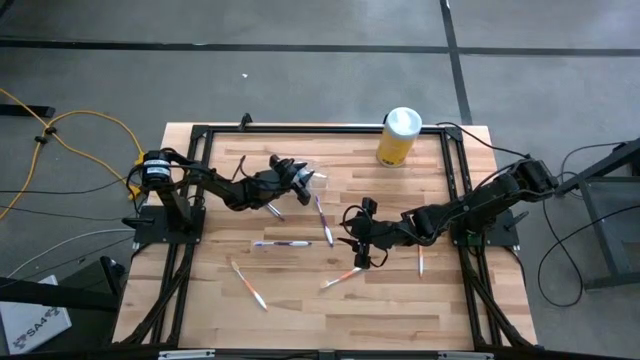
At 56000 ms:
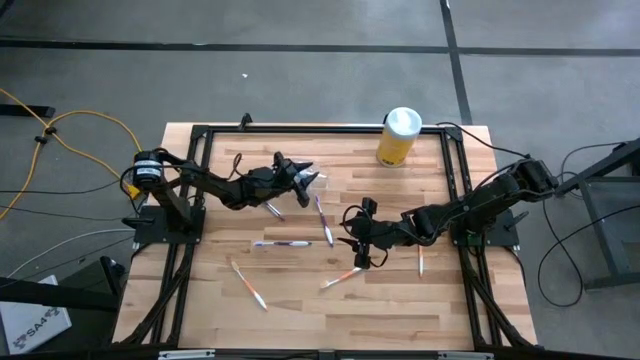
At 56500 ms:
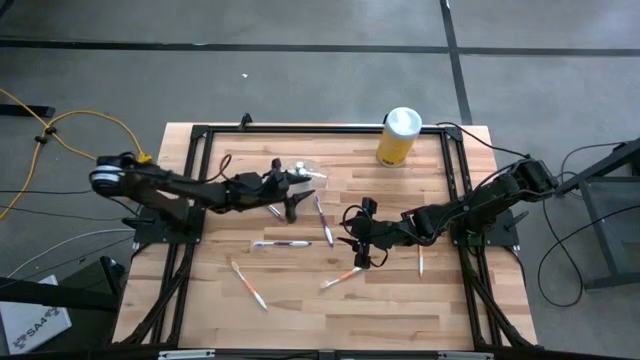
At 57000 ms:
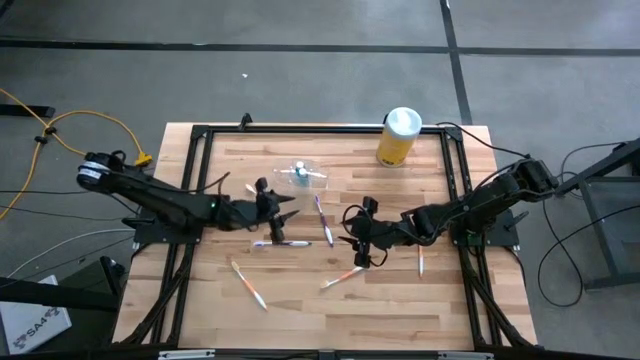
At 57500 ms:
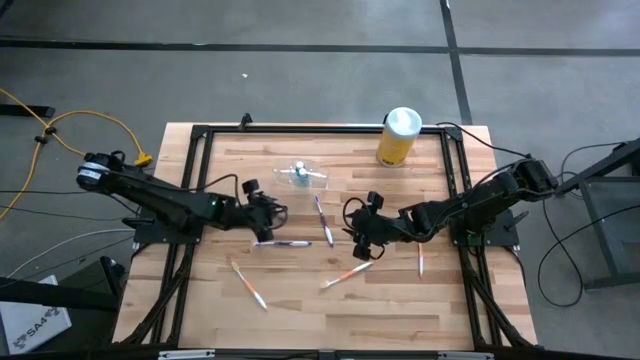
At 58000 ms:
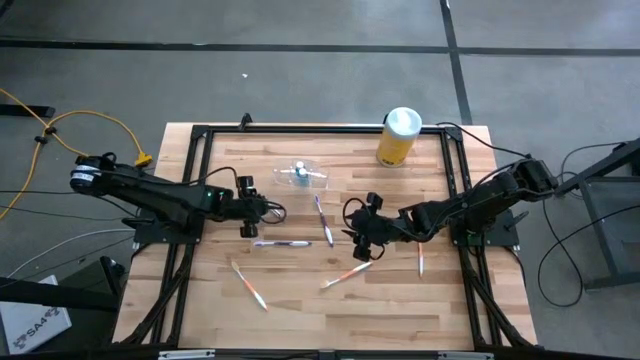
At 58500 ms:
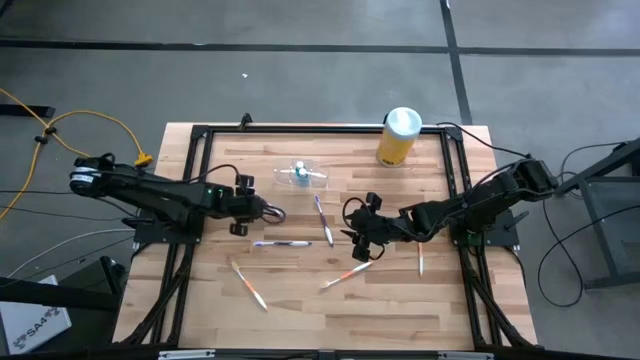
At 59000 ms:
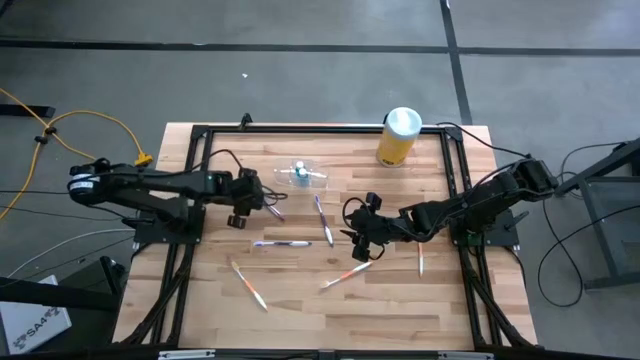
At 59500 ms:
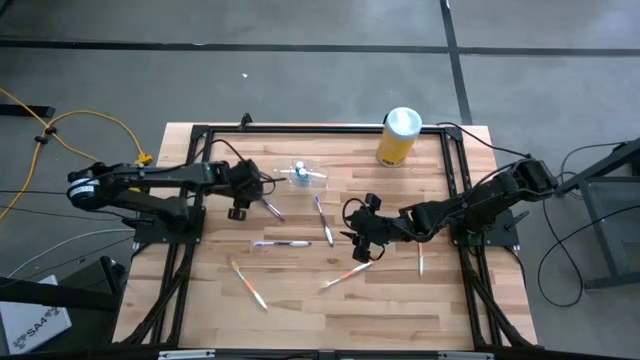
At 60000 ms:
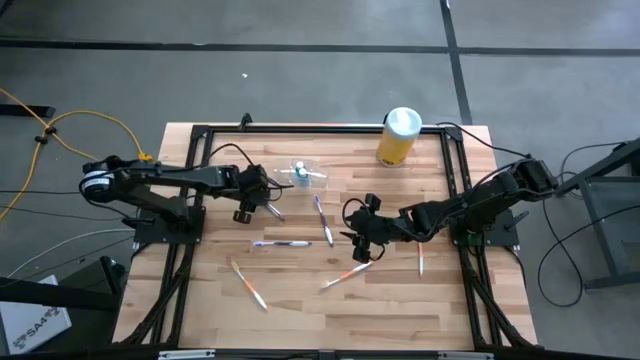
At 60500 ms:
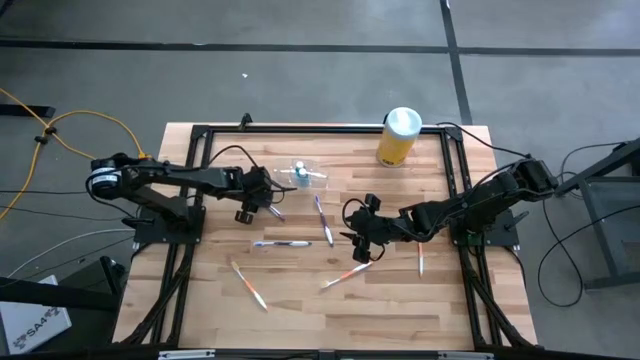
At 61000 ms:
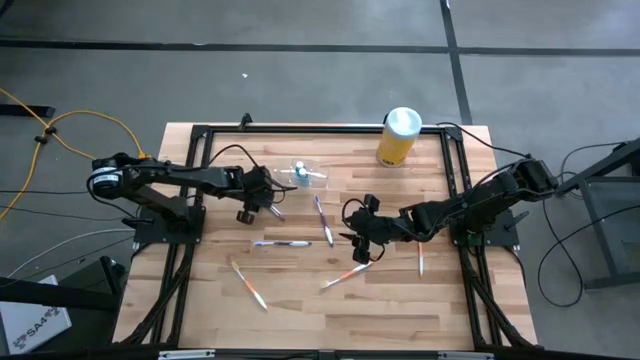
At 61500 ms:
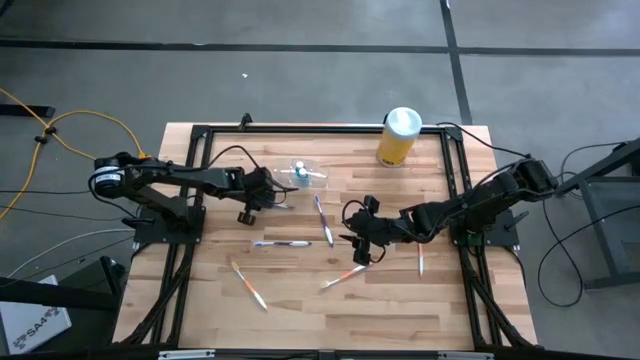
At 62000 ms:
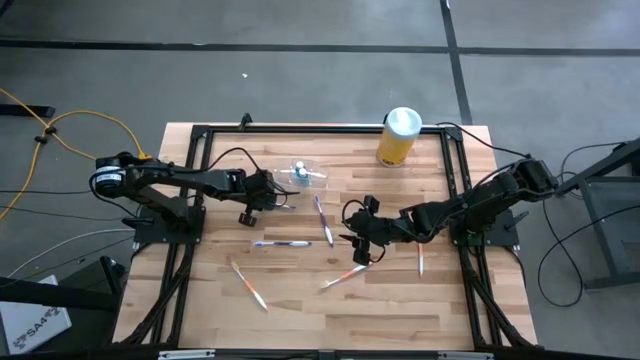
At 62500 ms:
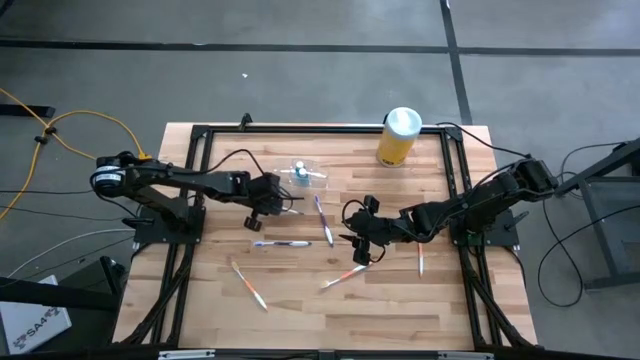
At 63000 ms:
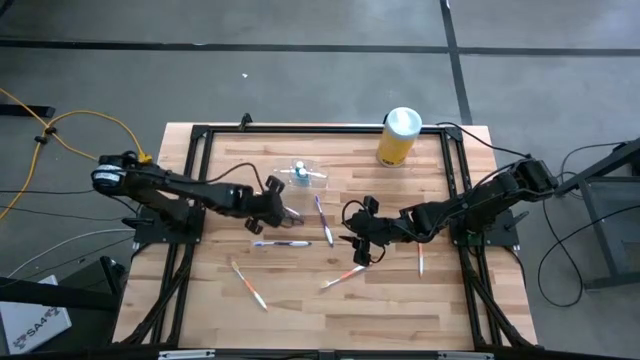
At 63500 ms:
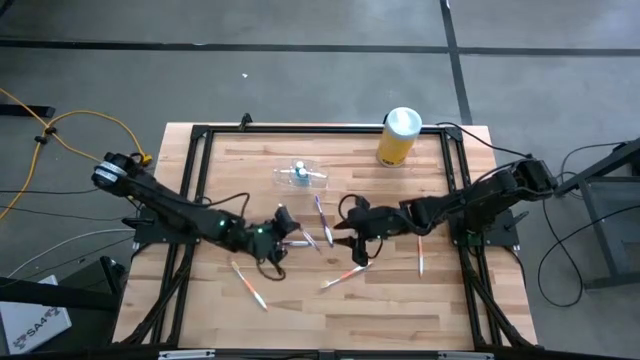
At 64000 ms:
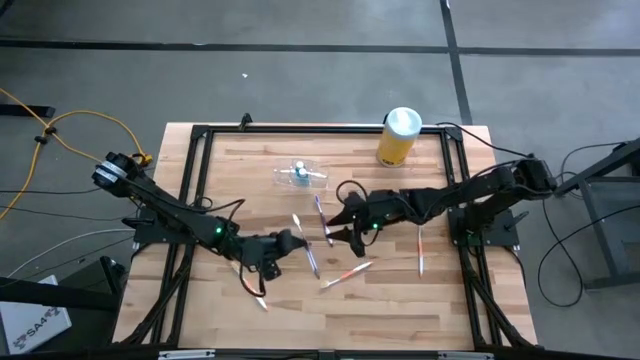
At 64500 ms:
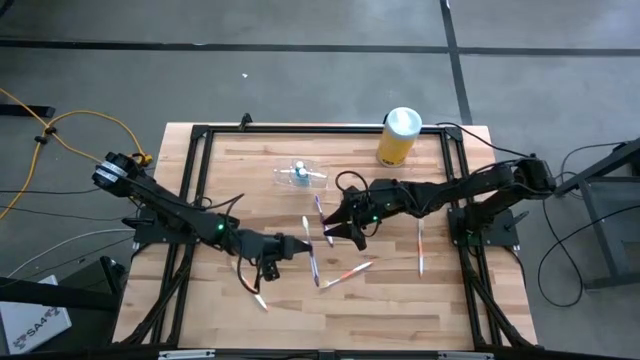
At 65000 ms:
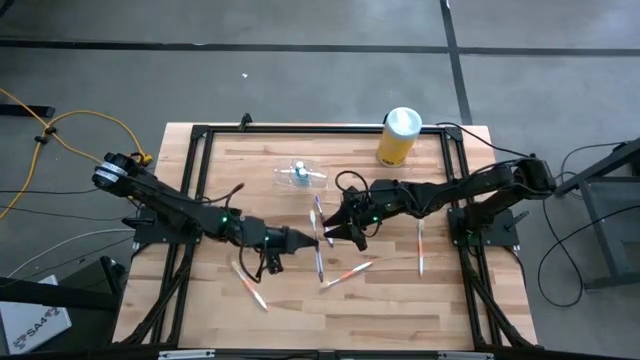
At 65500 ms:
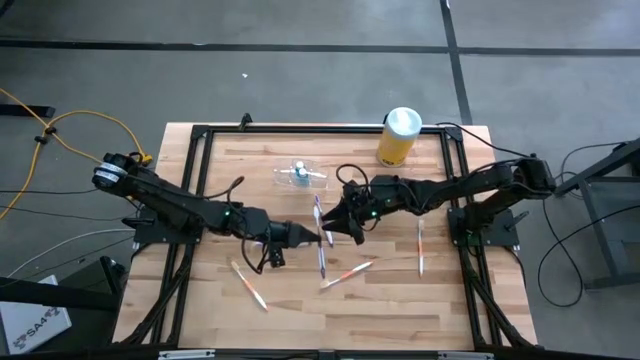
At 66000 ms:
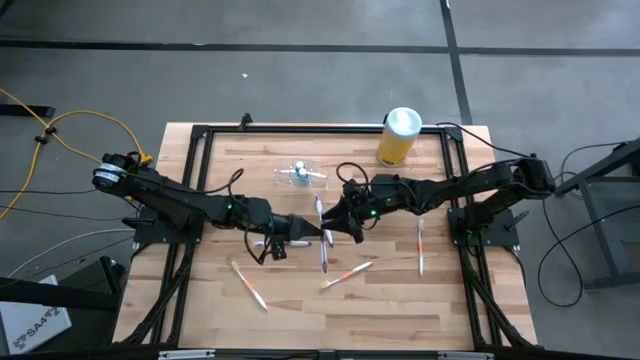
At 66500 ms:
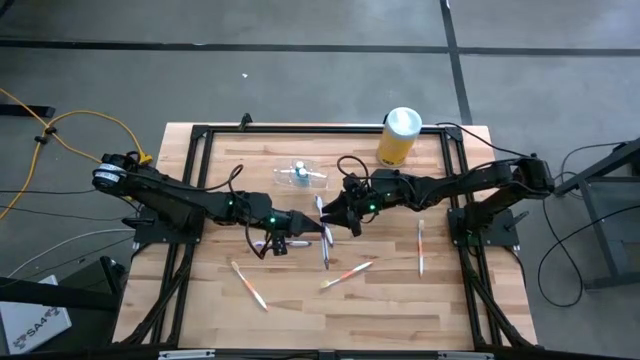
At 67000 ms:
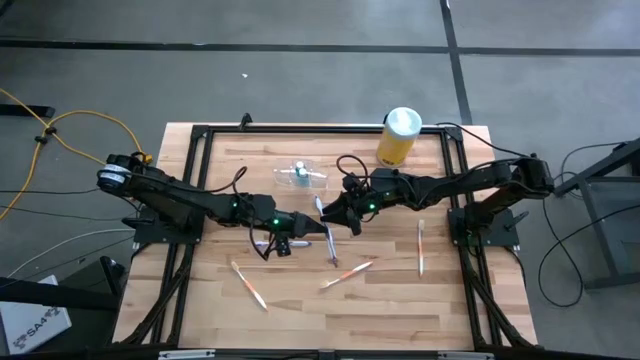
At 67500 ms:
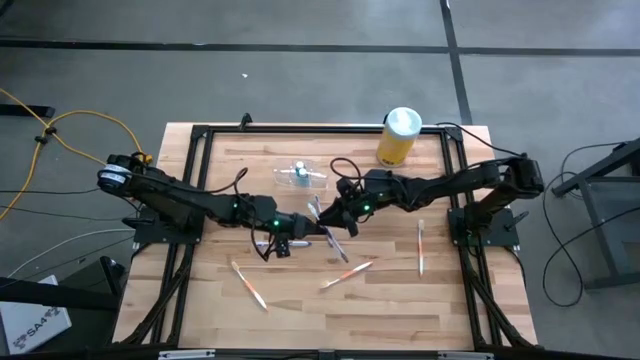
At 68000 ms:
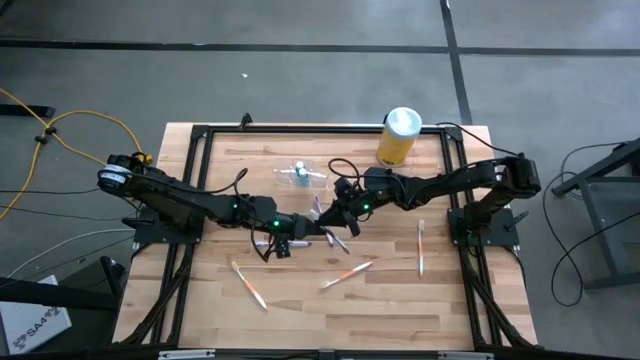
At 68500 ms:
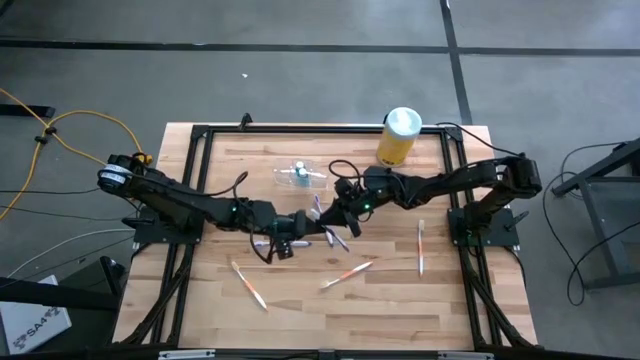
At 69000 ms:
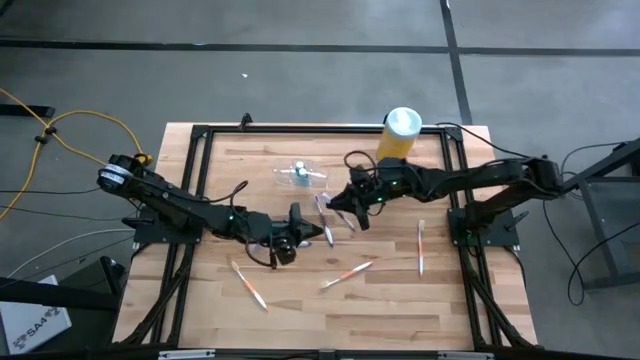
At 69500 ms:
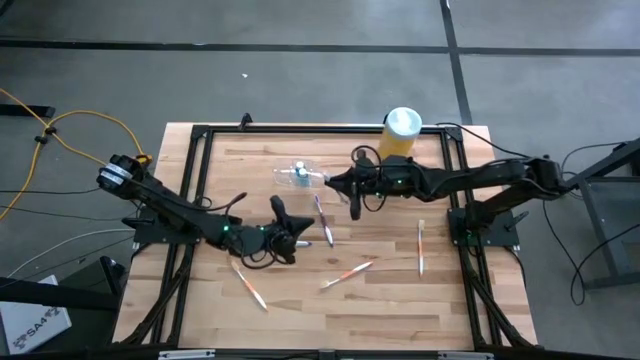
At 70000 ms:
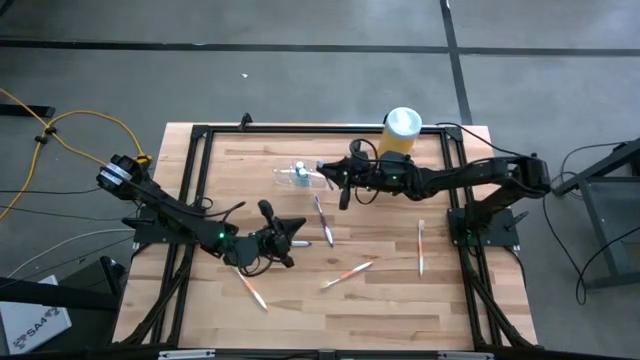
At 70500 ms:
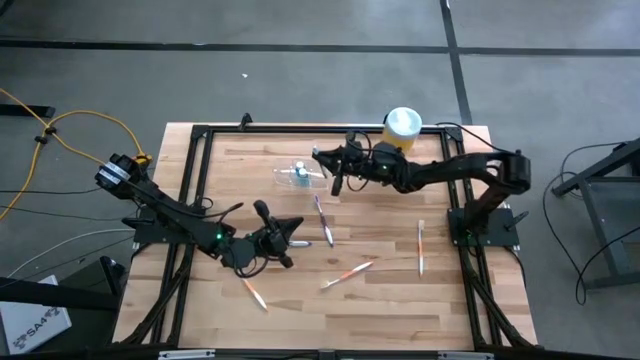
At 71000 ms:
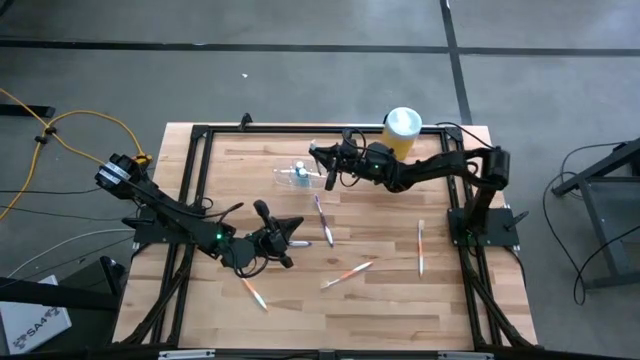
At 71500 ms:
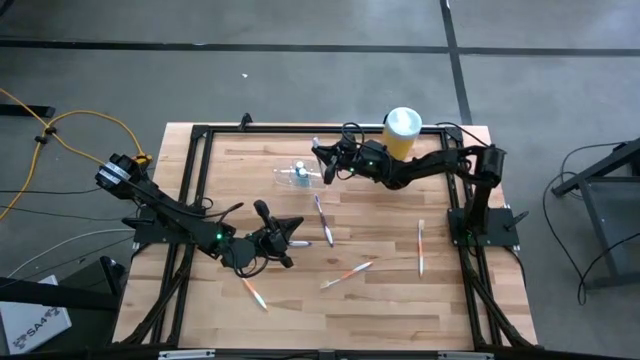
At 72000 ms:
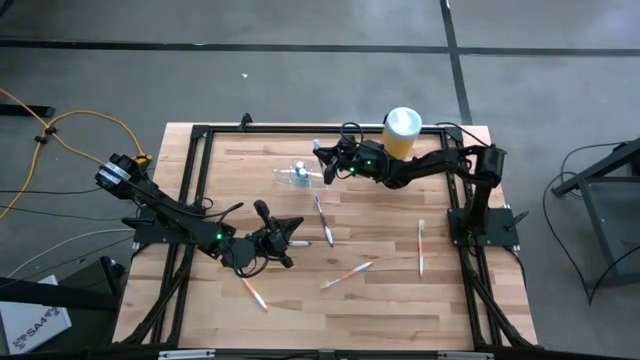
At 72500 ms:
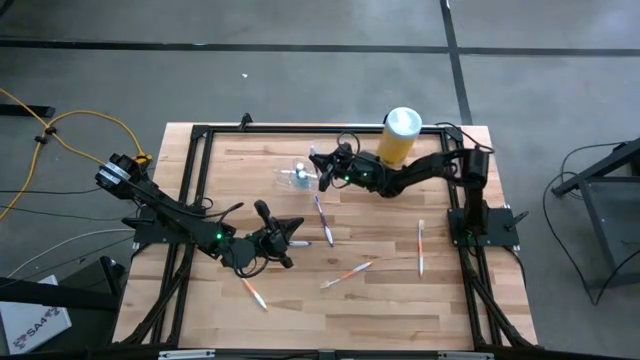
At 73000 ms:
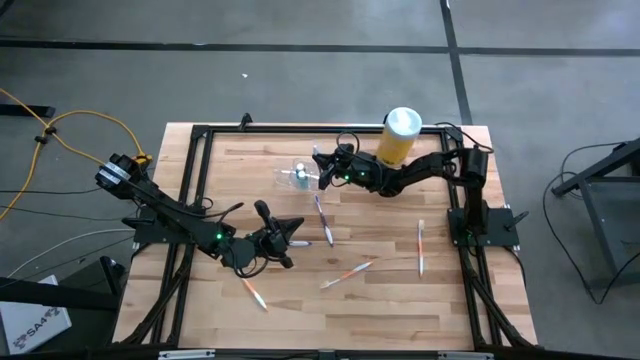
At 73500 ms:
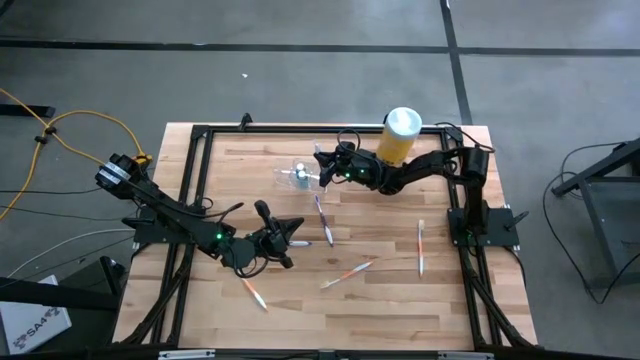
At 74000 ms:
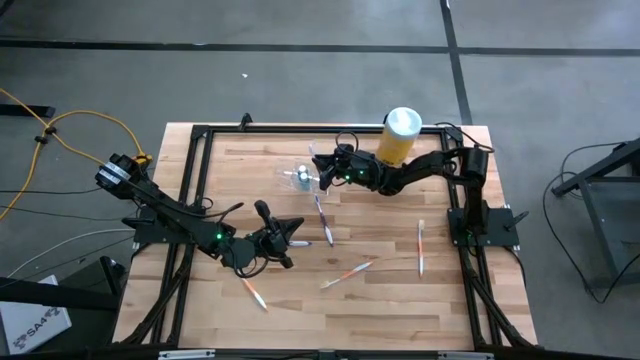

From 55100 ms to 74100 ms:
Task: Pick & Place toothbrushing station
Put the top left violet toothbrush into the transparent organizer

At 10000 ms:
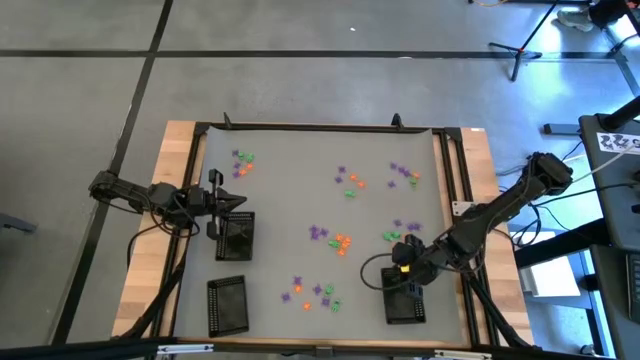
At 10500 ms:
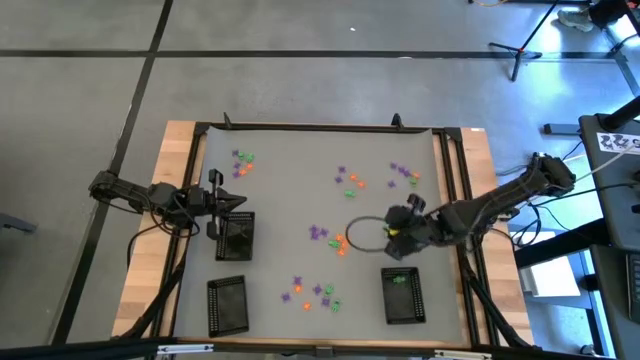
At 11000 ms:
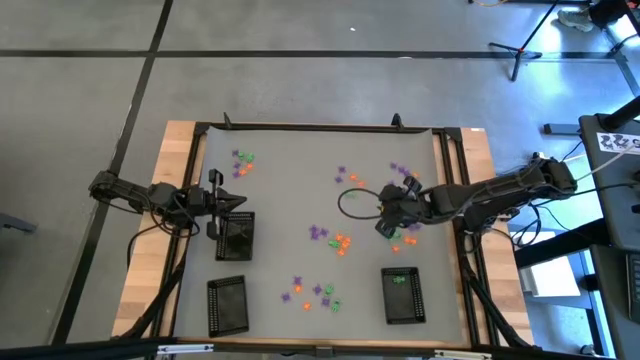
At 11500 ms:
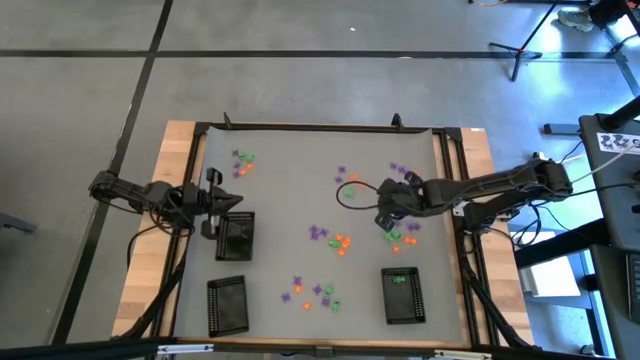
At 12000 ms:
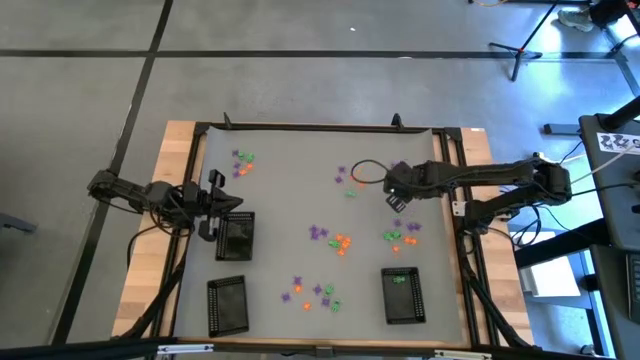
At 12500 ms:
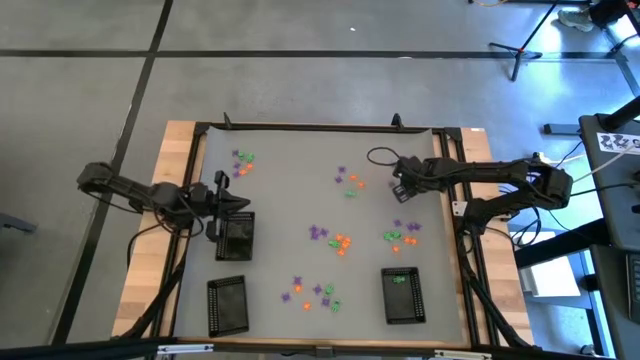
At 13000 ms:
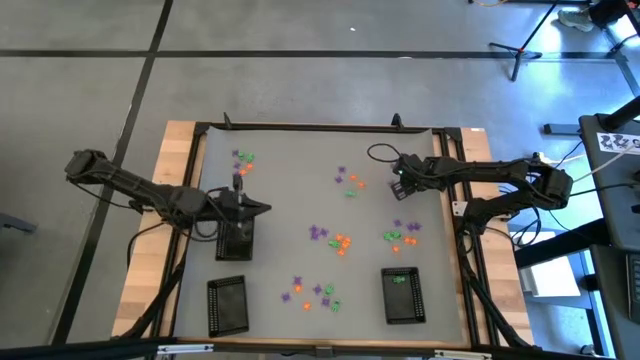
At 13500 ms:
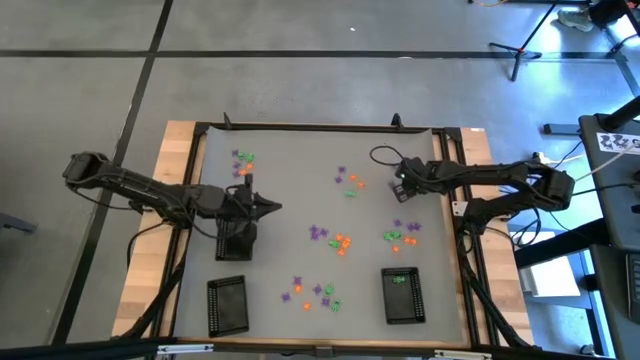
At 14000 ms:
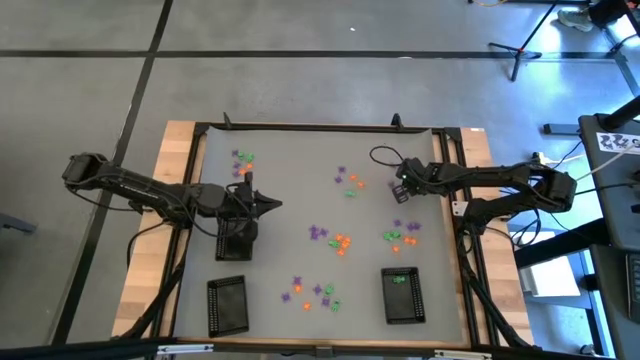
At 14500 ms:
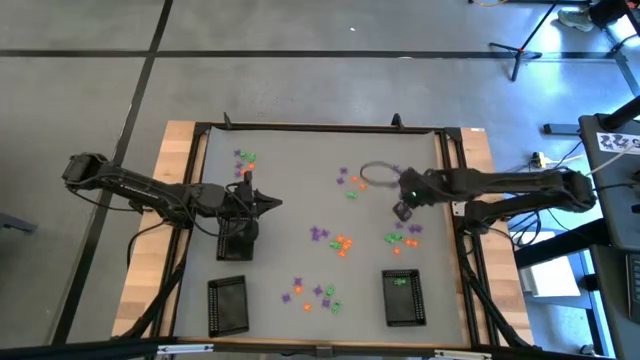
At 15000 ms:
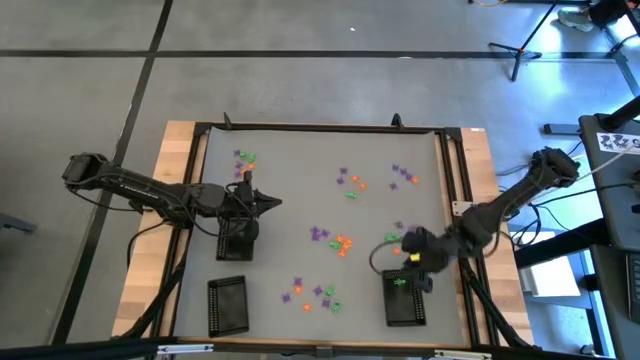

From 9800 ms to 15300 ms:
Task: Sort Halloween decoration
Put the green skeleton toy into the bottom right black basket
